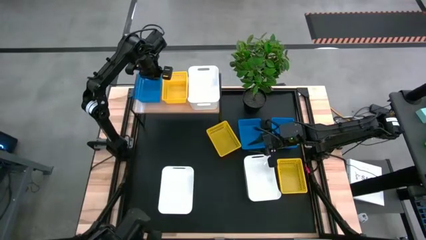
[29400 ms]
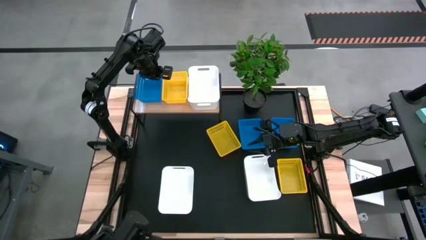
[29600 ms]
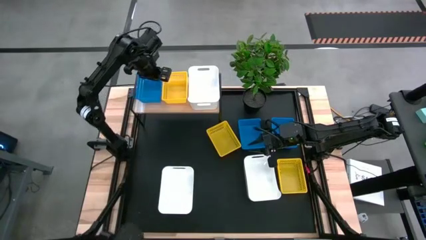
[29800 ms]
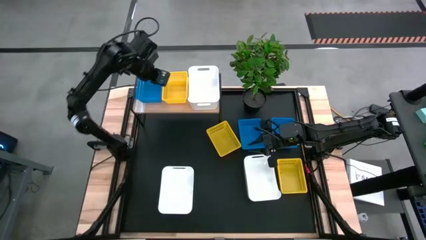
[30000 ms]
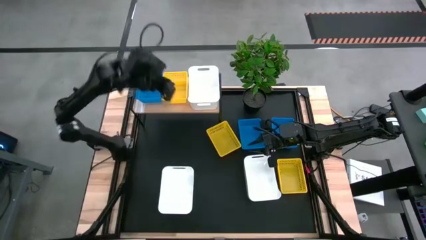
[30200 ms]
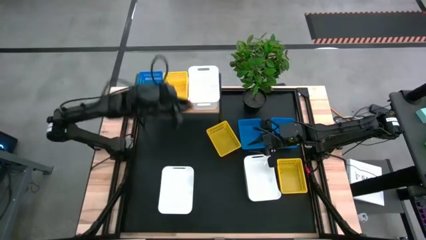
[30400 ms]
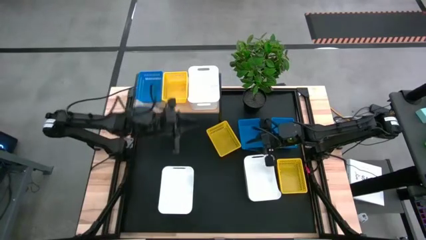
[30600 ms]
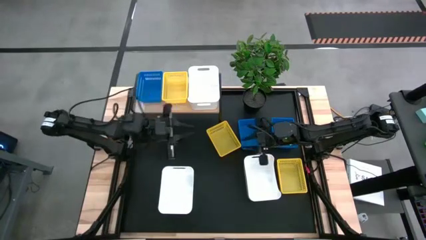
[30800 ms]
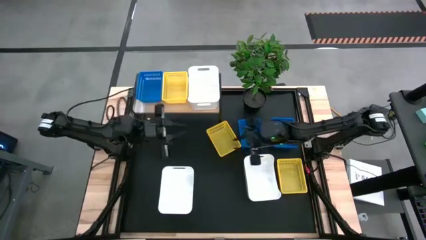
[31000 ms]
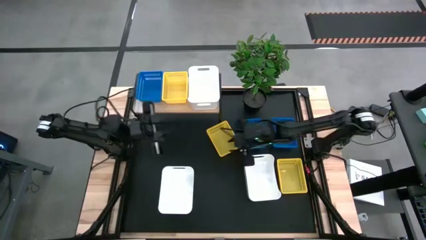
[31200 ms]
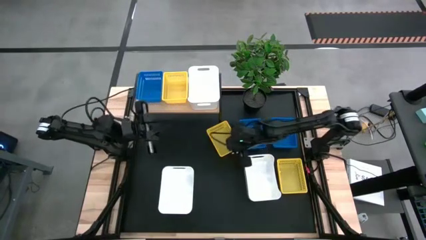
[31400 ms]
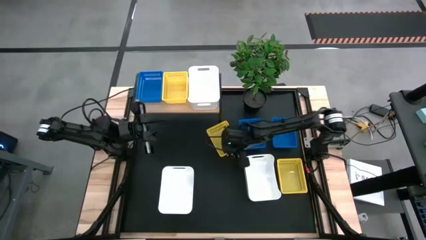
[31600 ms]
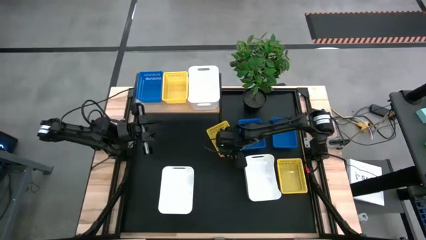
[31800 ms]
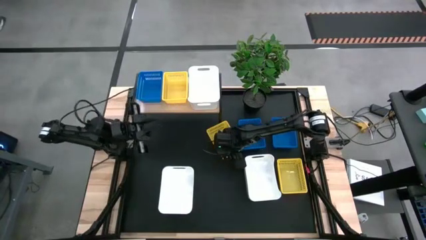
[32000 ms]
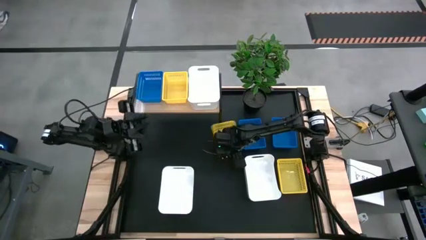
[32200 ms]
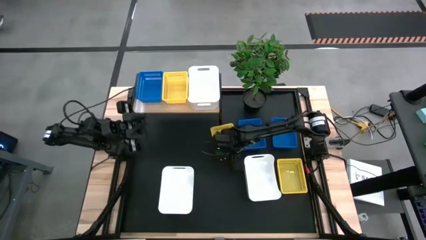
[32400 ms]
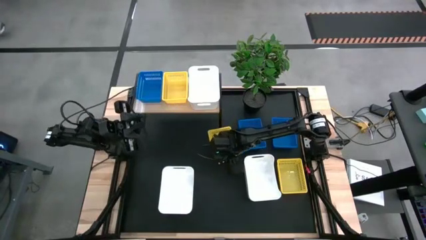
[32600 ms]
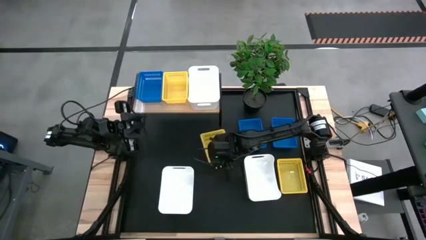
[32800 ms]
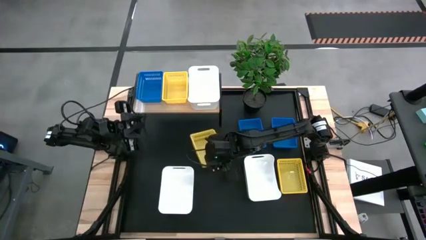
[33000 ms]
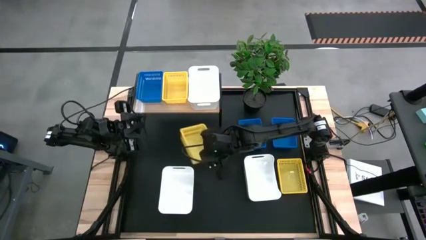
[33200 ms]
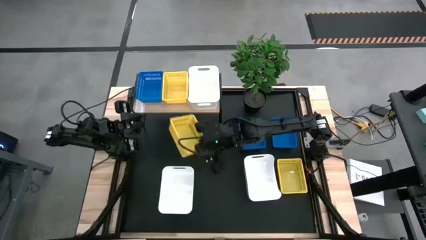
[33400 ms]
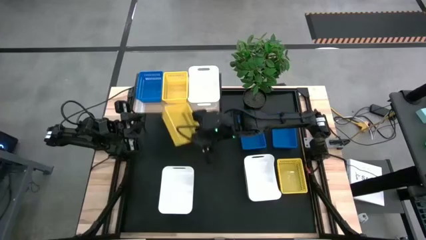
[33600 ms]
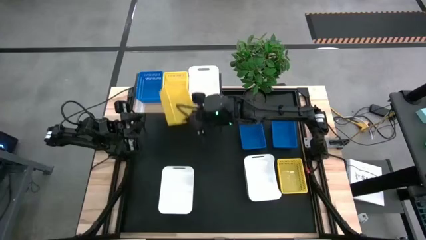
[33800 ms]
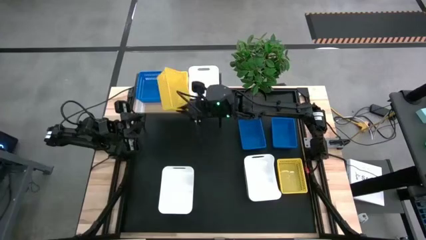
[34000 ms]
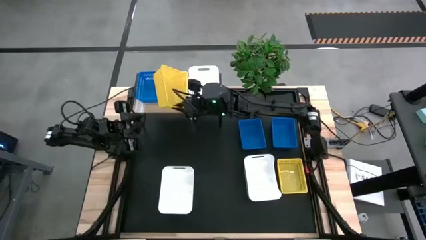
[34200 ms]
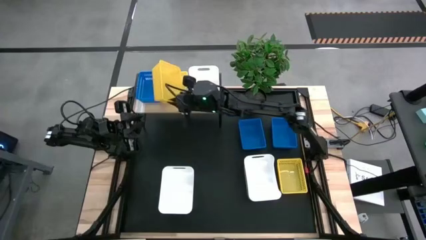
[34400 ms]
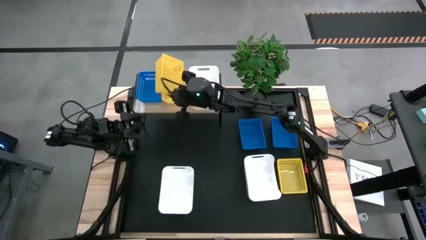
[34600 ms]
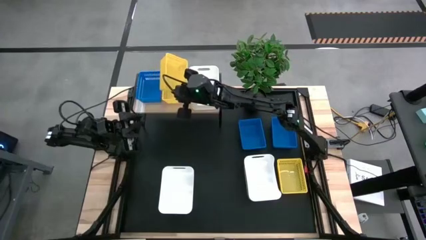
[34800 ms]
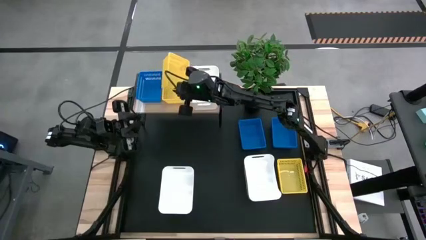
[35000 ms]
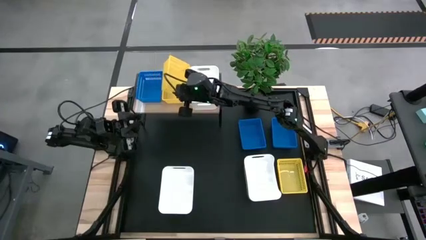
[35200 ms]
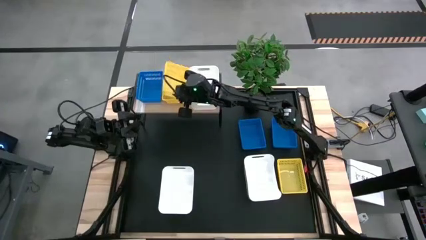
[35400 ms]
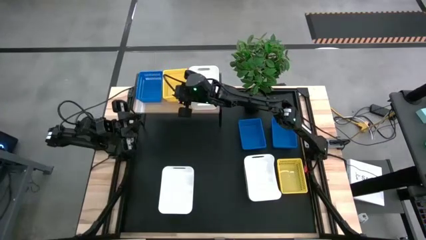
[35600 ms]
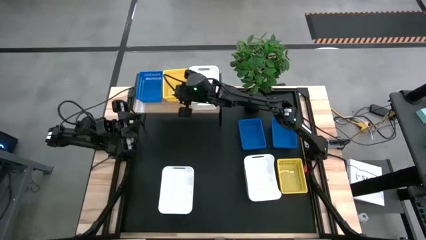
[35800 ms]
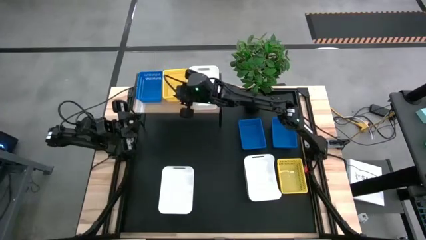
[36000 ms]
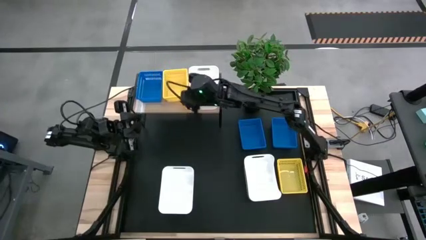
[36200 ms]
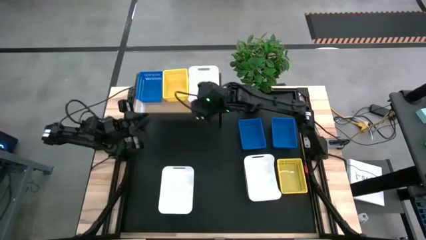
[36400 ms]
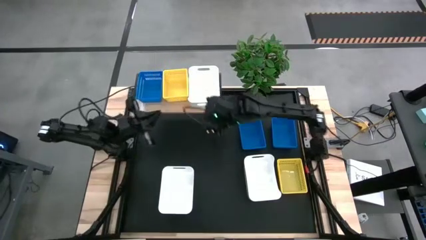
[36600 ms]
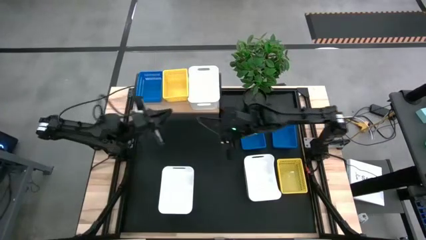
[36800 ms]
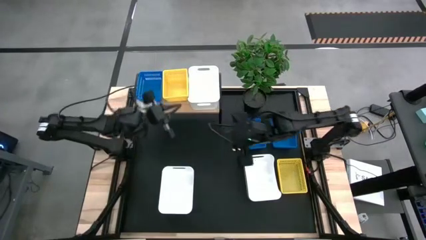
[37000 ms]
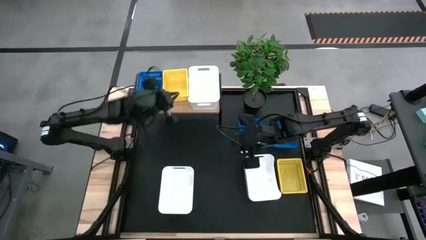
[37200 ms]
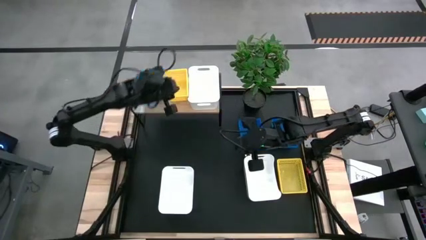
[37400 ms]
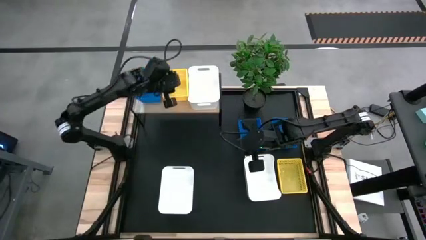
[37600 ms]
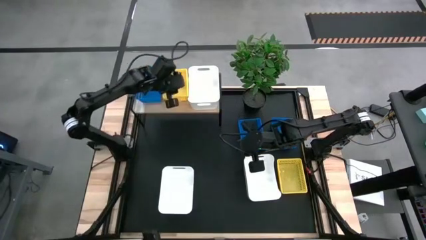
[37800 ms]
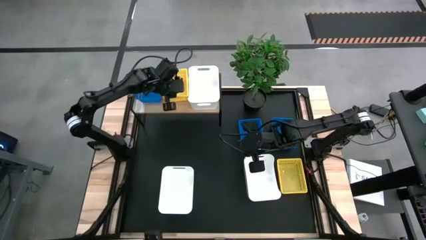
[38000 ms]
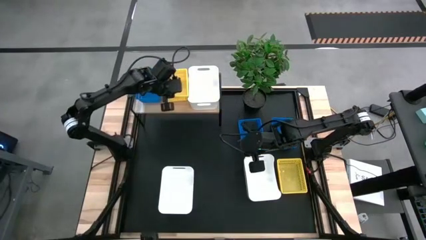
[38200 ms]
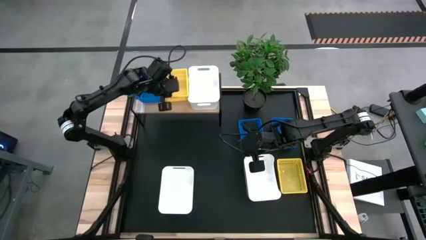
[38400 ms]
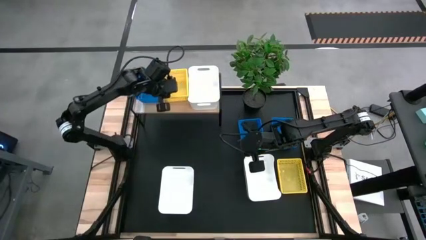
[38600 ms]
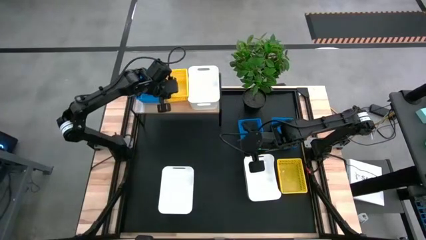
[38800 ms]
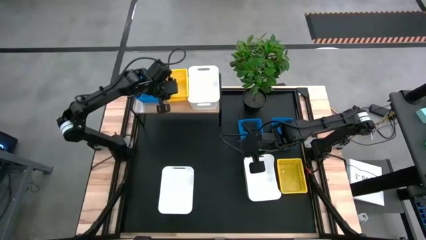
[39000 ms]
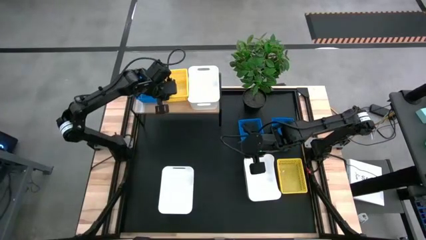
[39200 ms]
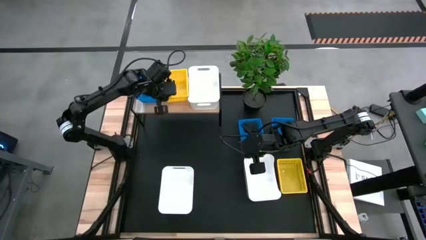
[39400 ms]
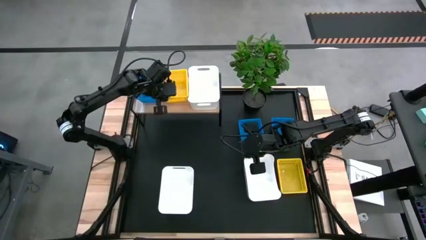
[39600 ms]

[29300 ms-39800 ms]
Task: Stack baskets on shelf by color
Stack the left yellow bin into the yellow bin on the shelf

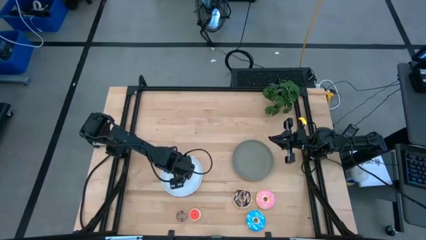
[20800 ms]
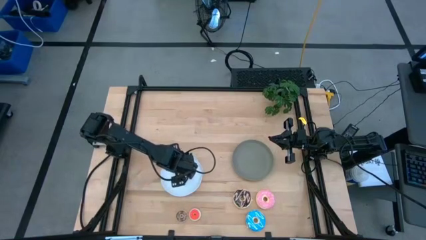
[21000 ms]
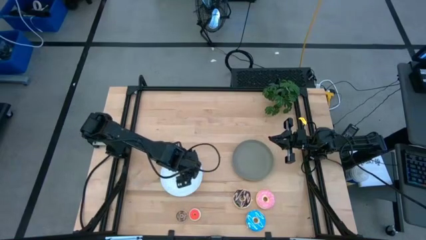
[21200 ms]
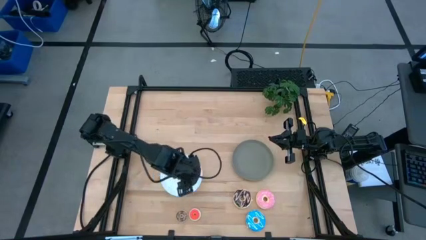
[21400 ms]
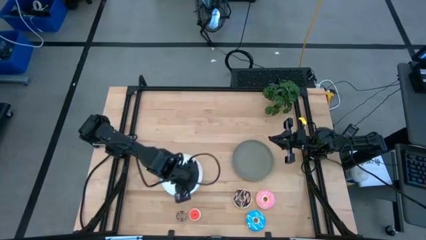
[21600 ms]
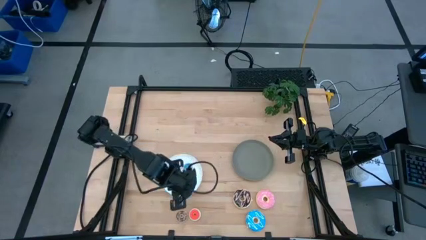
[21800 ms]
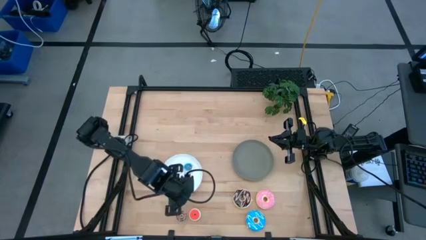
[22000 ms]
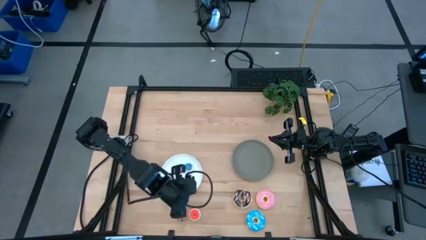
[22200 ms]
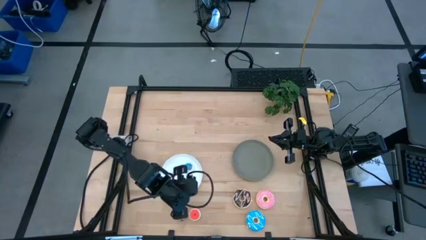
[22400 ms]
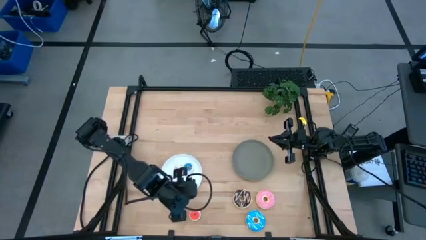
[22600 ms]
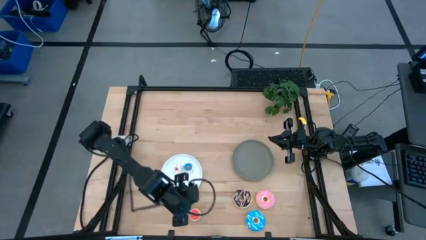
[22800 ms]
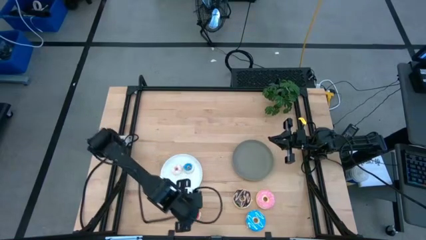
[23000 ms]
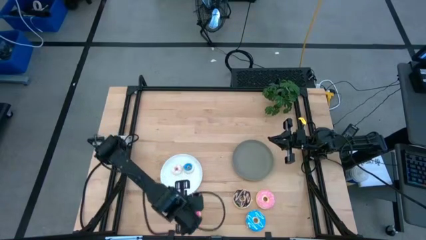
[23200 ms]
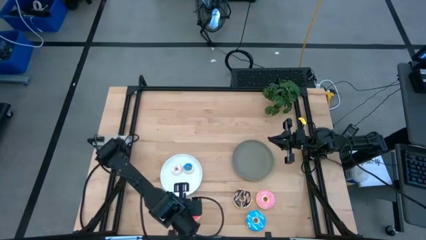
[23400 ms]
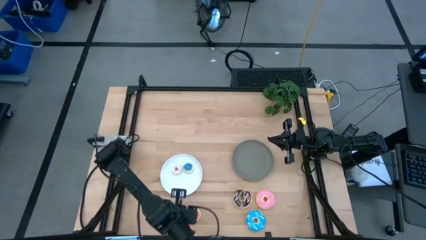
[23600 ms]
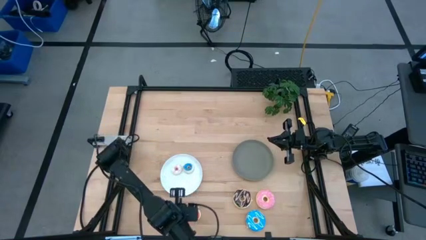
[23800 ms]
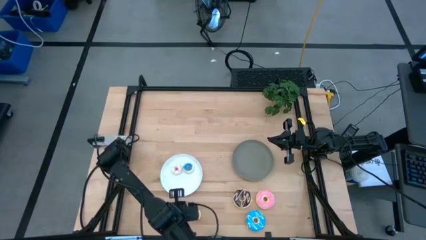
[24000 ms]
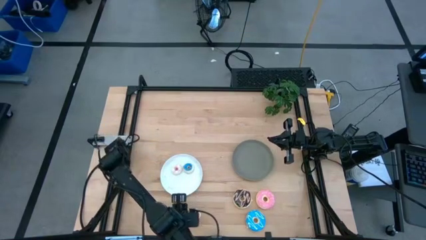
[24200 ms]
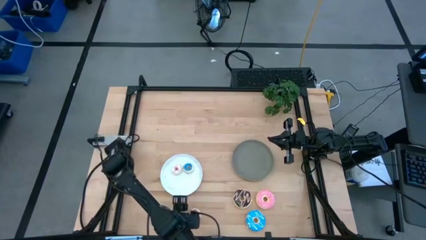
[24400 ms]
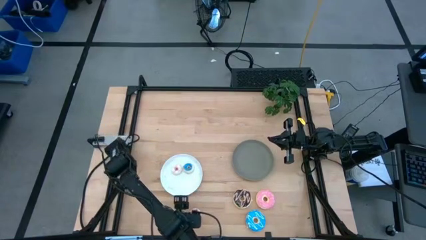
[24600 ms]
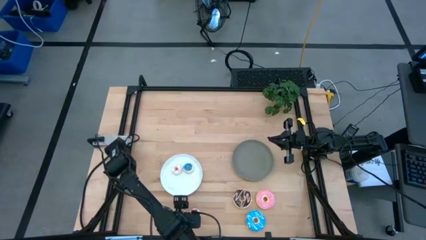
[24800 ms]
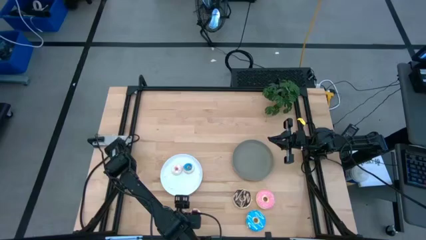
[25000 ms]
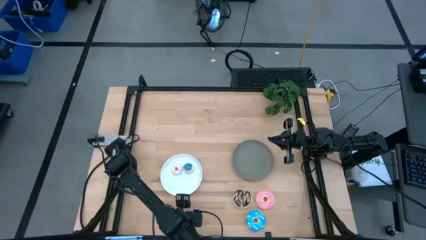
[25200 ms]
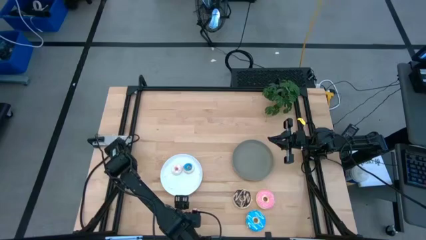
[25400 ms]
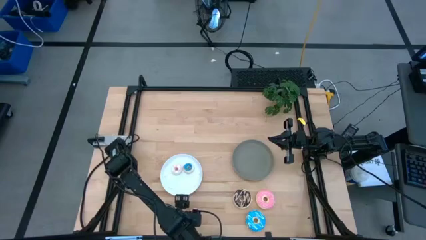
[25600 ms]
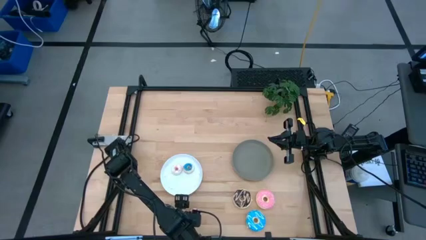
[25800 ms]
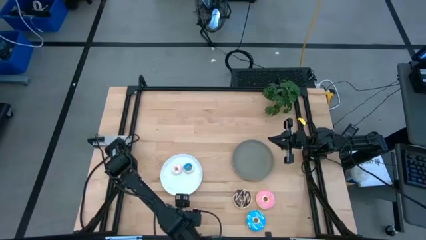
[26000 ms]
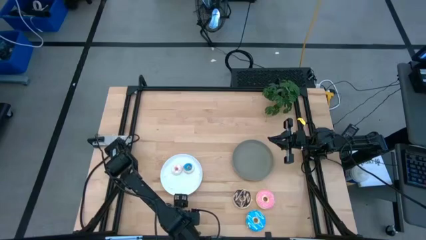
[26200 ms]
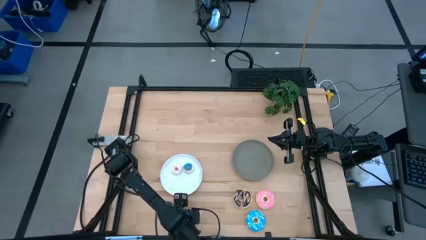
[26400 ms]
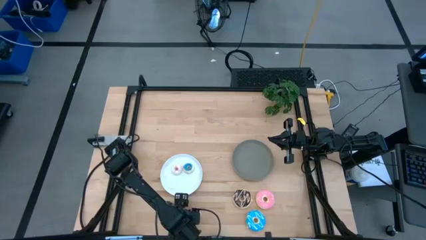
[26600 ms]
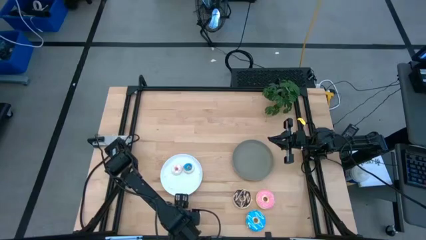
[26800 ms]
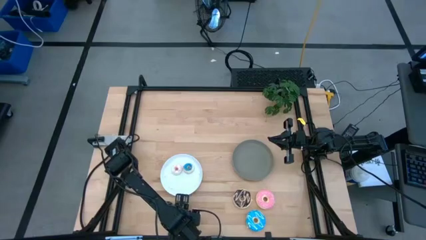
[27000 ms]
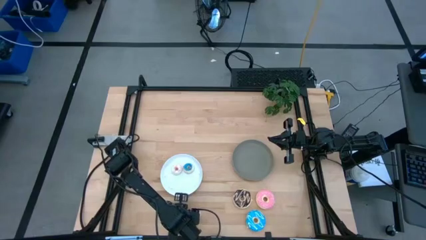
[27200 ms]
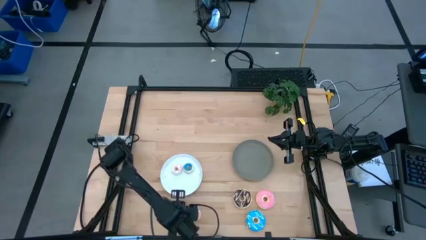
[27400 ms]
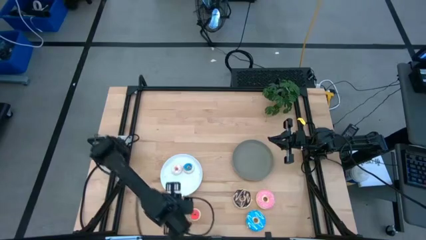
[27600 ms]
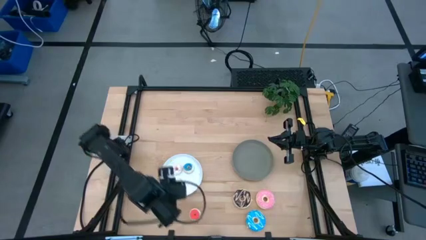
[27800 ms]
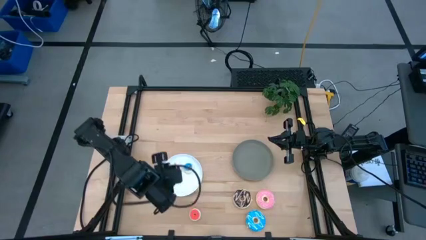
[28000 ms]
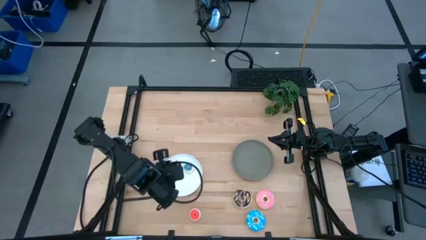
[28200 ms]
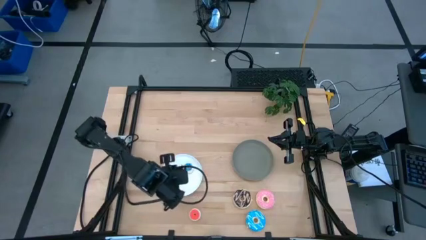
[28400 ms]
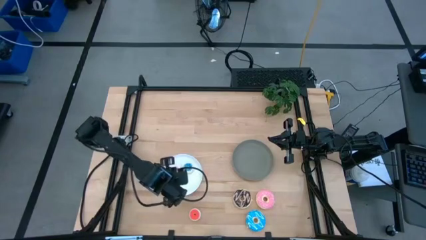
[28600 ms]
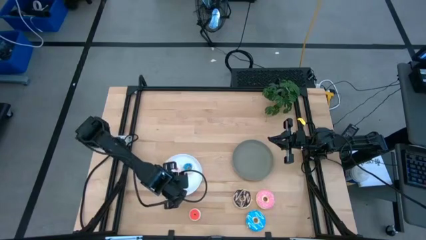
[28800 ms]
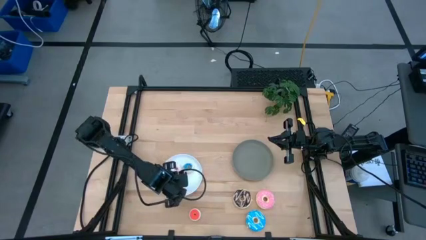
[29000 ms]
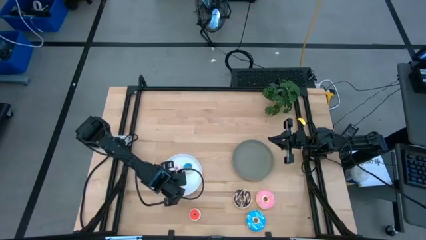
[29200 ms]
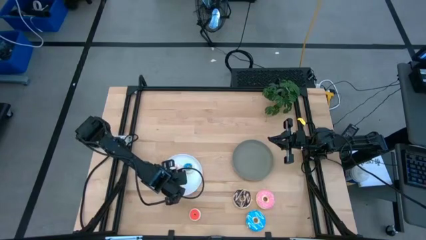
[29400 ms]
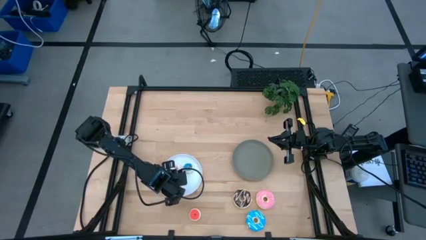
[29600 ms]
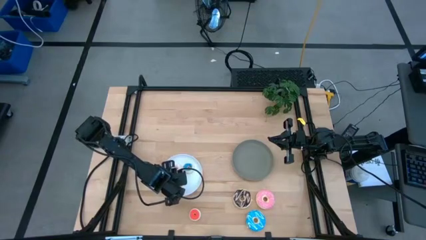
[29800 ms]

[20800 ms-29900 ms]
Task: Pick & Place donuts
Put the small brown donut on the white plate
